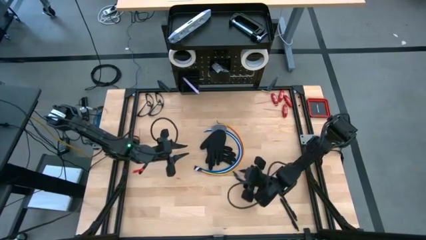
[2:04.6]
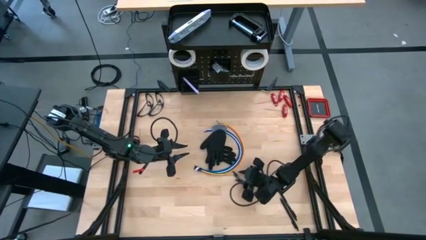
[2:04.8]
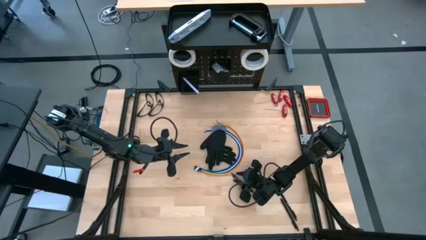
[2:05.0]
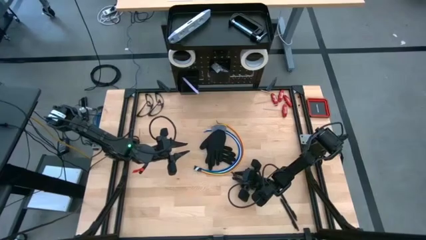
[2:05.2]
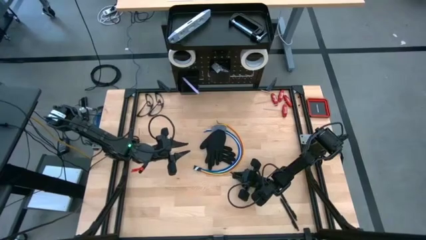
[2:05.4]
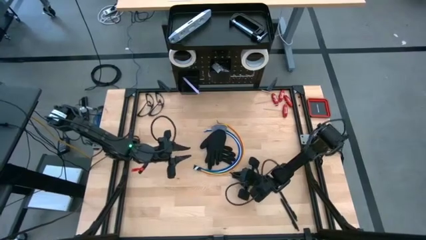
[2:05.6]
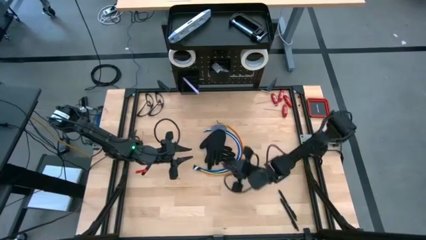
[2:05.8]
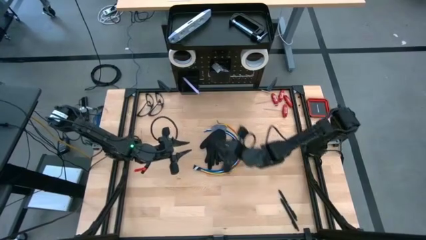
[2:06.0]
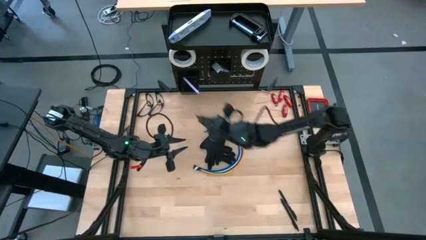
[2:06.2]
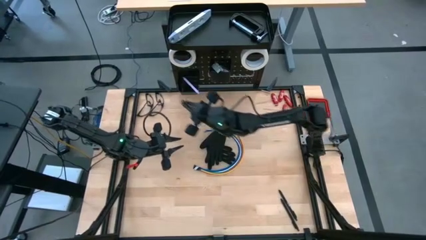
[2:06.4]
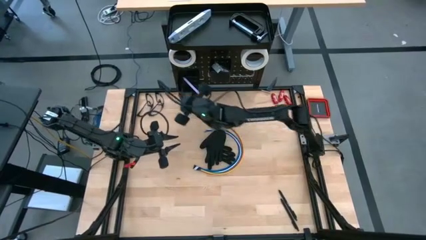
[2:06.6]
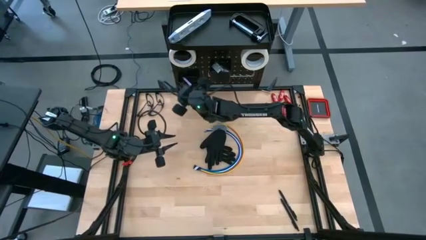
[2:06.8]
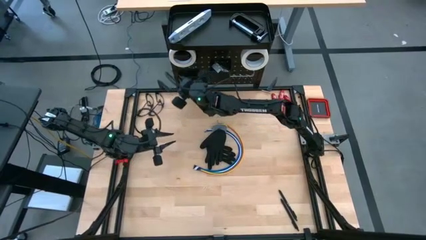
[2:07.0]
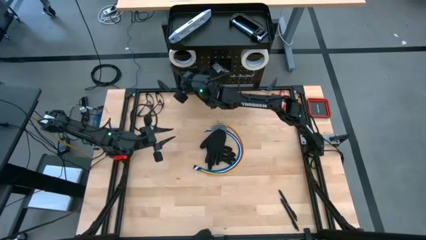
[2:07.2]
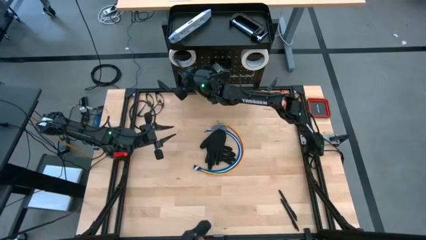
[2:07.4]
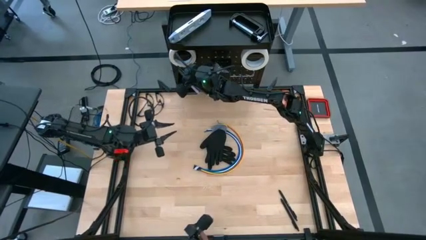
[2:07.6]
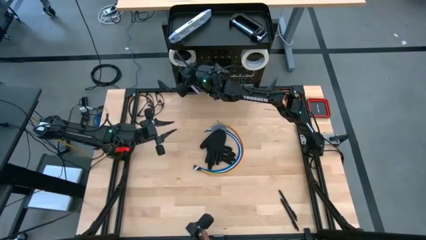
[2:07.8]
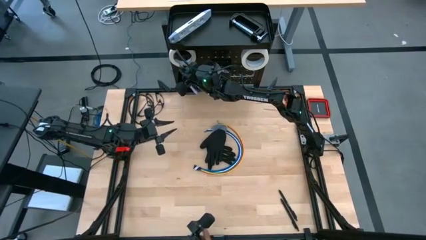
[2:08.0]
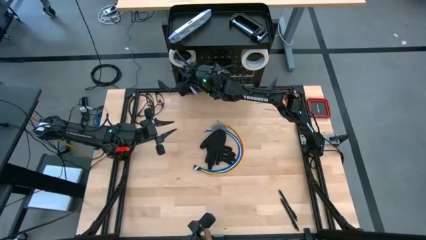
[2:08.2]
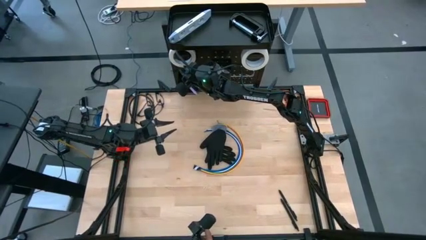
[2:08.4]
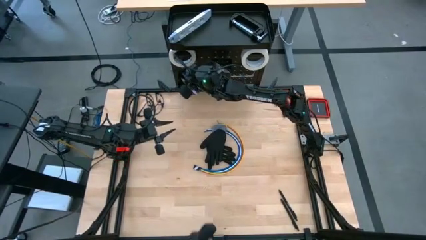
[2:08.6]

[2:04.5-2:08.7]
Task: Hang tools onto peg board
Put the black pen into the black bin on the peg board

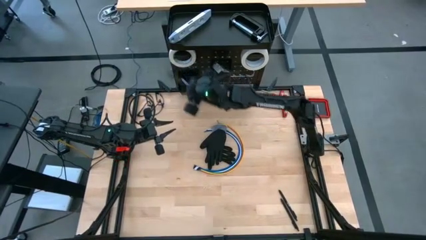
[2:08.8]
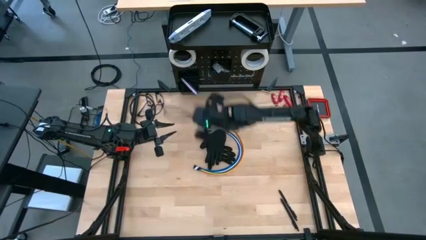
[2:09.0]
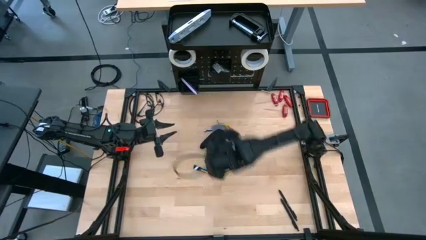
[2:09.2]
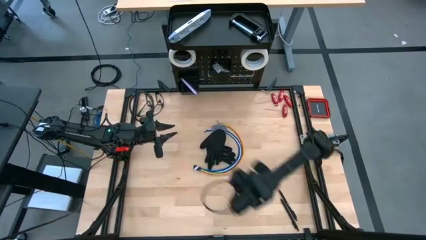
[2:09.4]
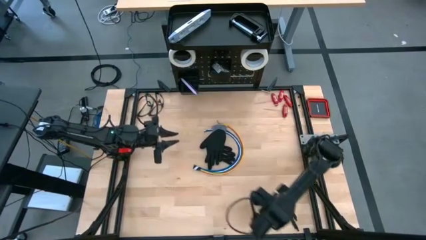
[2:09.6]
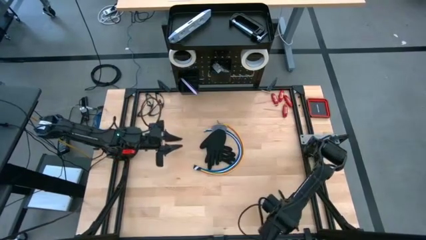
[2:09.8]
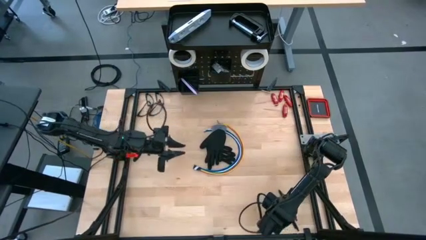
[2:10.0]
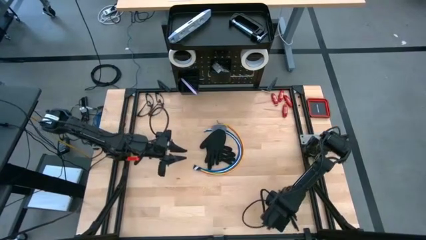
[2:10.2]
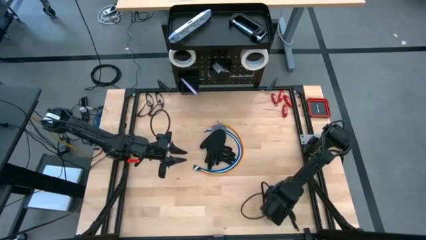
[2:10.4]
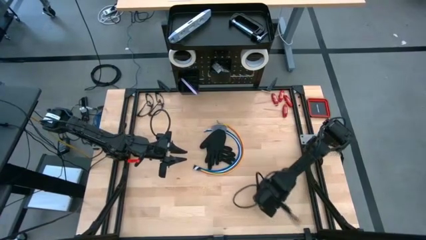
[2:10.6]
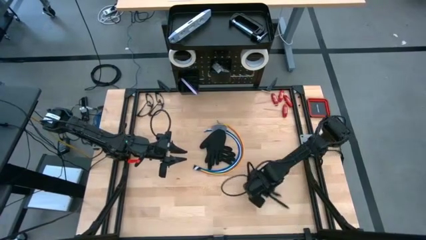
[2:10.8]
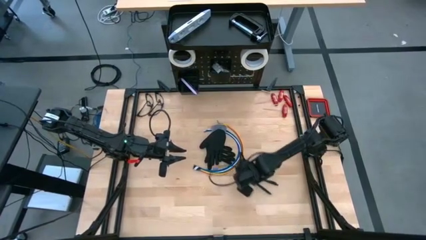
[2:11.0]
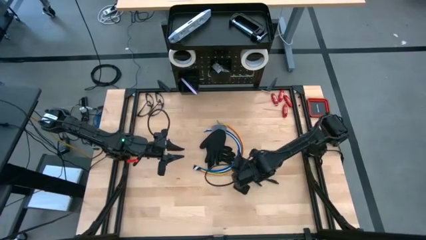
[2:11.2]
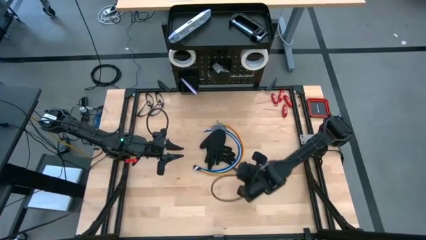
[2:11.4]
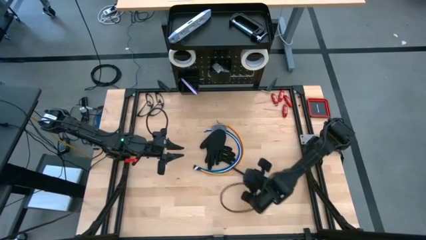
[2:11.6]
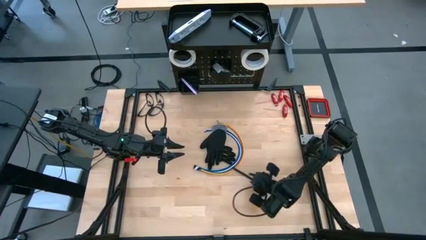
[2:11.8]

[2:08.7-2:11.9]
Put the black pen into the black bin on the peg board

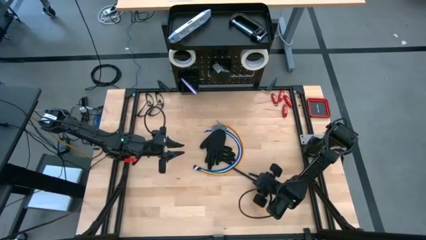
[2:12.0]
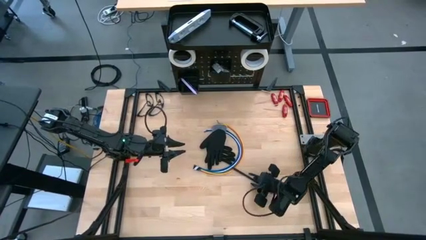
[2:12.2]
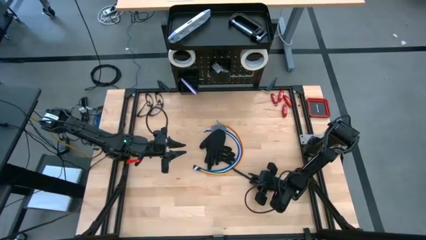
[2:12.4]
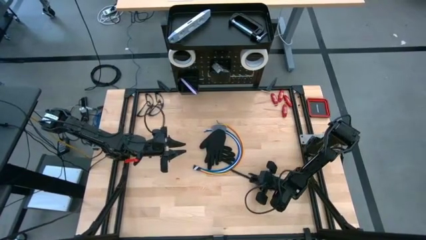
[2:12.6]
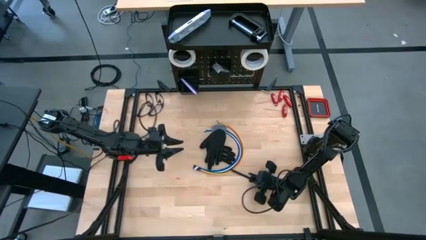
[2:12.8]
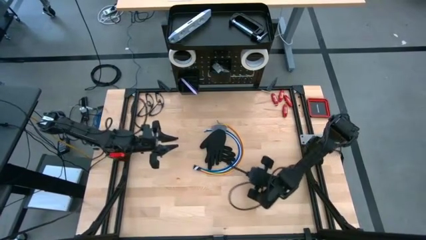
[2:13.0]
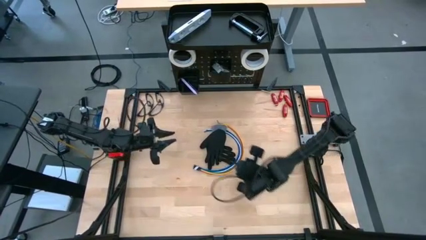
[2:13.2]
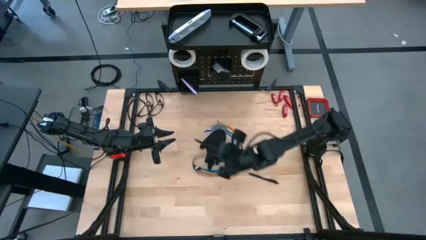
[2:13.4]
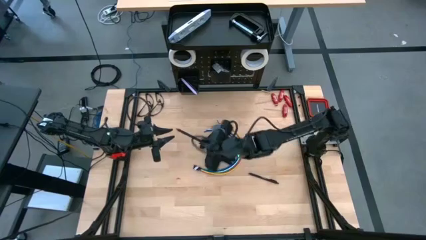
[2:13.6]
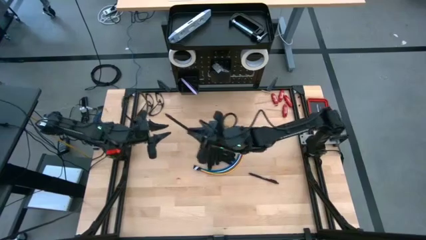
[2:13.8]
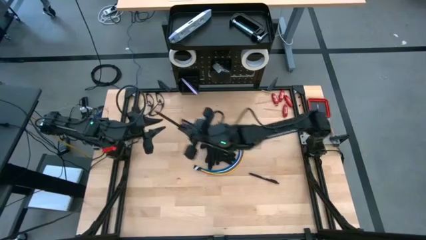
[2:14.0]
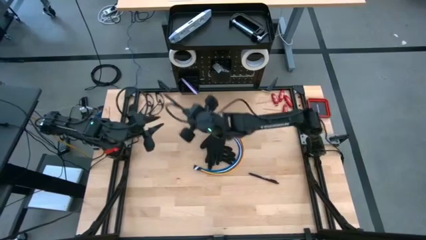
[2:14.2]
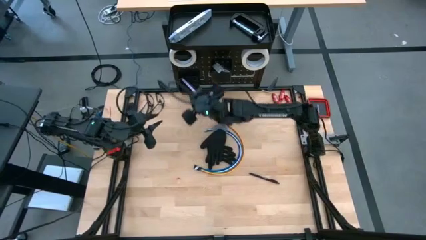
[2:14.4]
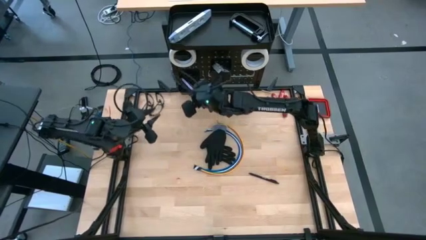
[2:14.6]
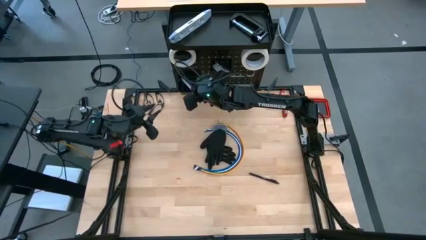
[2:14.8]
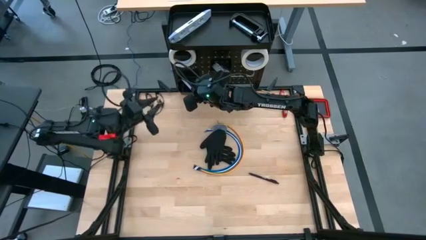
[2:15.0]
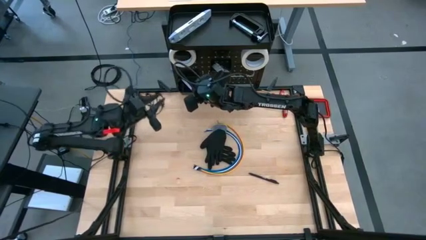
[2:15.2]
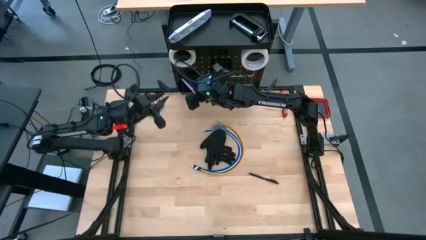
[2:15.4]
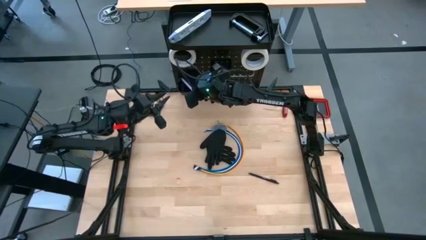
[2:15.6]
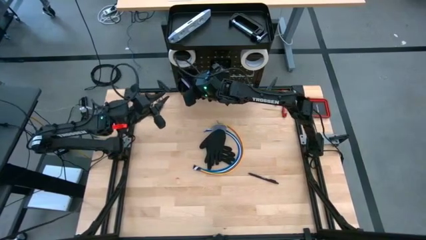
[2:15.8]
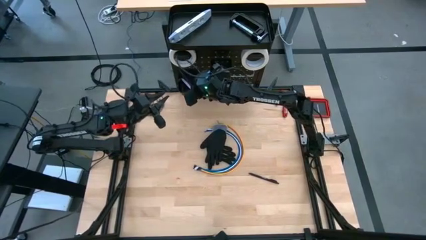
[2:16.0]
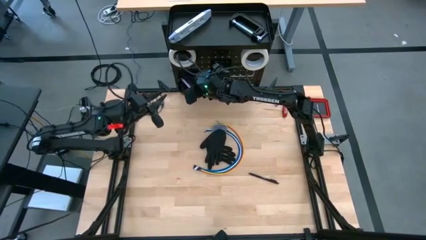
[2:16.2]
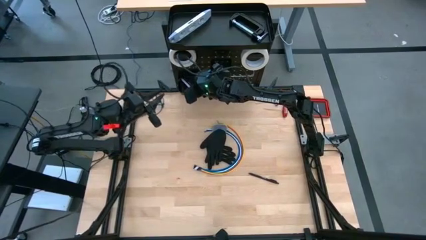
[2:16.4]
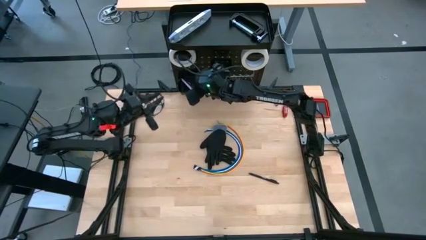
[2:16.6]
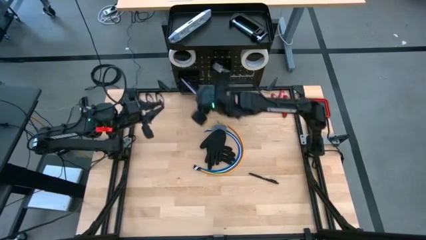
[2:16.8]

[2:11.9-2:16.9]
Put the black pen into the black bin on the peg board

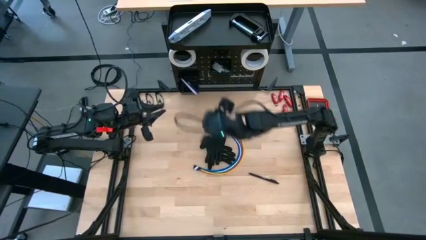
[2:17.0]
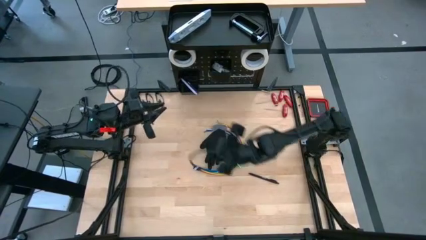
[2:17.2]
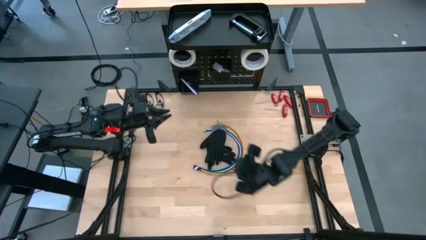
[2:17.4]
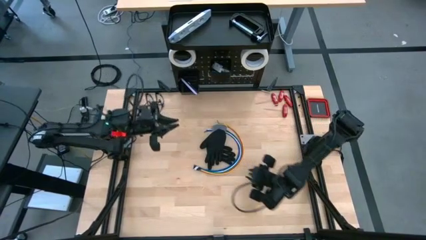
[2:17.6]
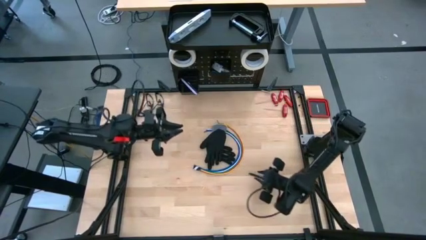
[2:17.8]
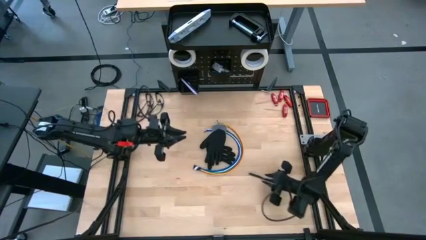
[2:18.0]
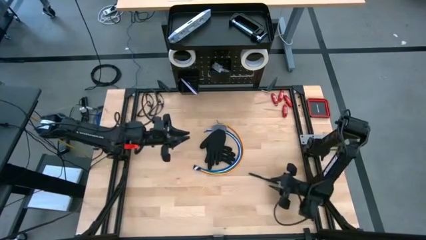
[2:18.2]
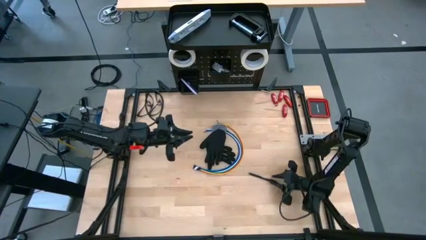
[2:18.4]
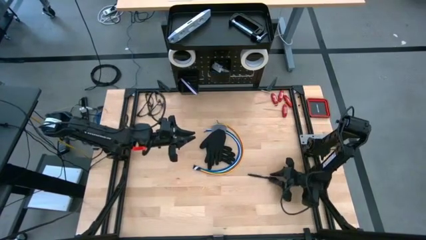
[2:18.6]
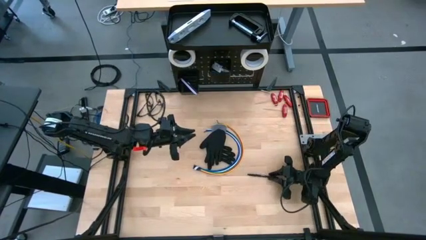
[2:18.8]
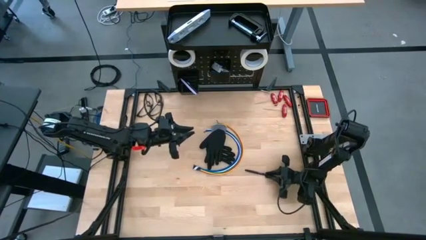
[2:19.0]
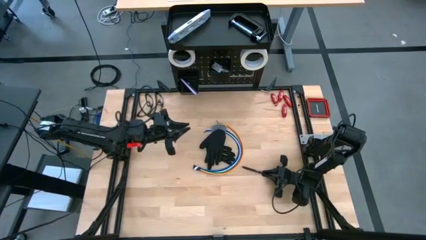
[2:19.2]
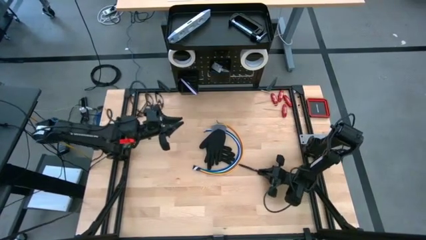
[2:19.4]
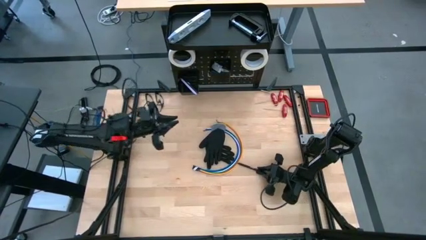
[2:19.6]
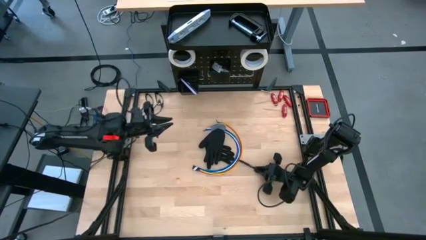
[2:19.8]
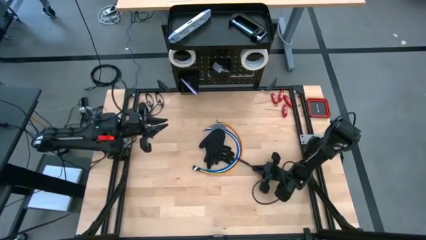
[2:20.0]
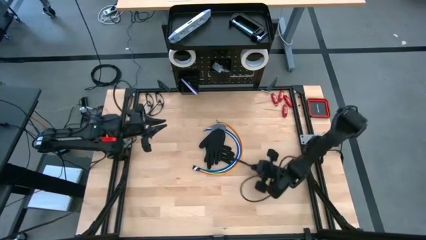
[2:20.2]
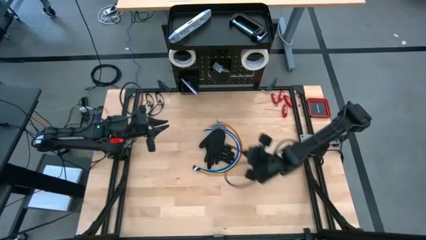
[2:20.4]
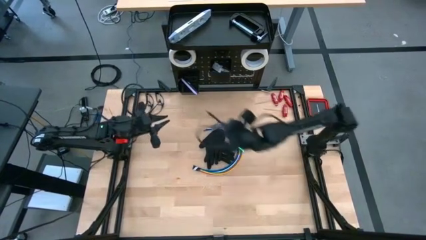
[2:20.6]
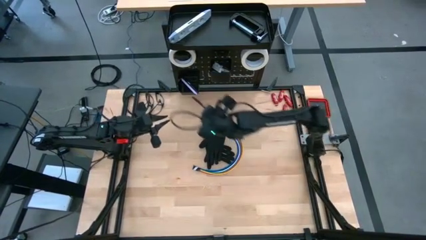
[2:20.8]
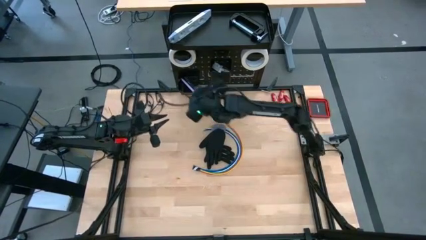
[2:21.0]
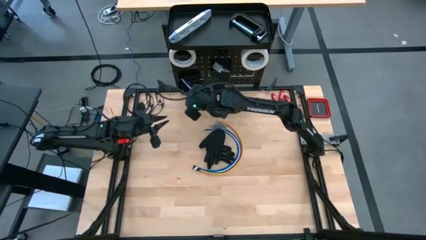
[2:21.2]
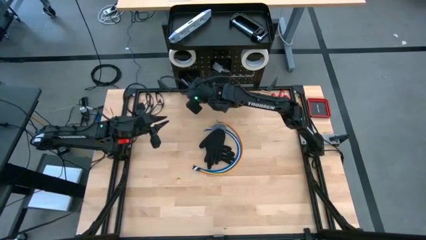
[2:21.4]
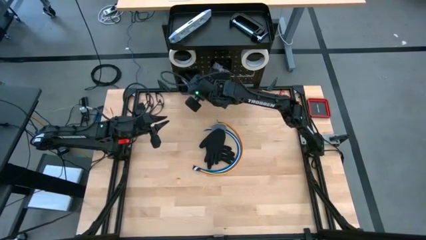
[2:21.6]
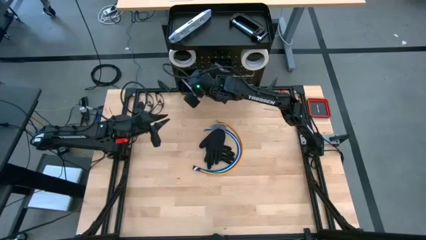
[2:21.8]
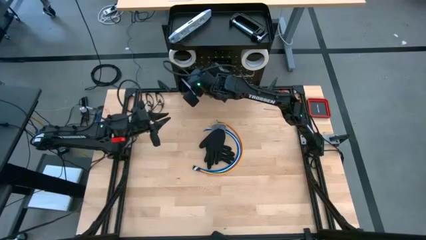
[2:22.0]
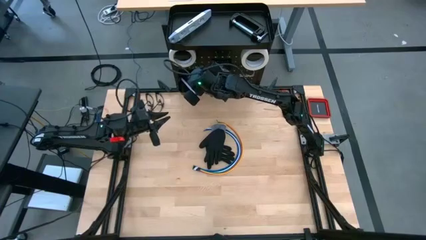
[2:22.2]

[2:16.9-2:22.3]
Put the black pen into the black bin on the peg board
